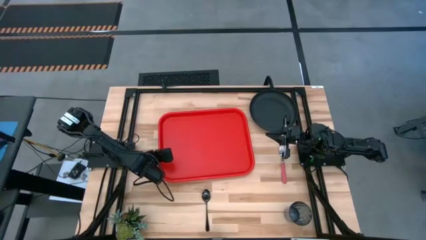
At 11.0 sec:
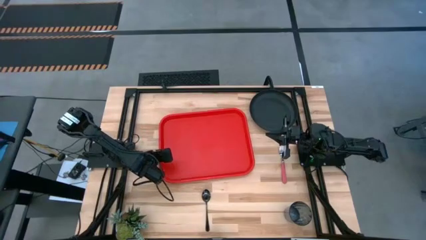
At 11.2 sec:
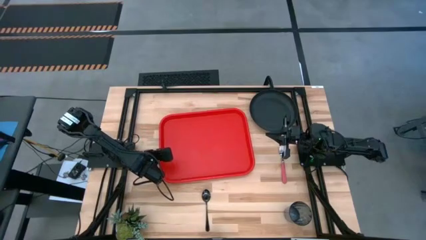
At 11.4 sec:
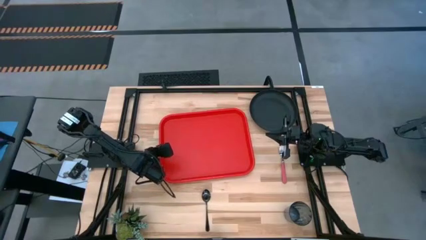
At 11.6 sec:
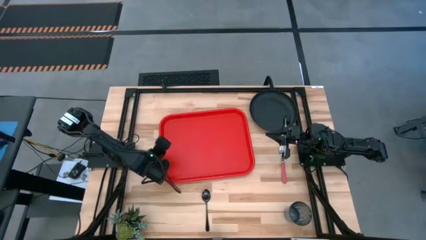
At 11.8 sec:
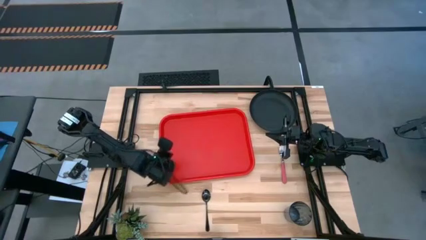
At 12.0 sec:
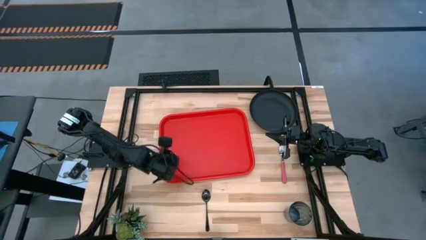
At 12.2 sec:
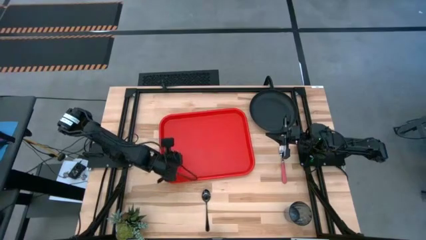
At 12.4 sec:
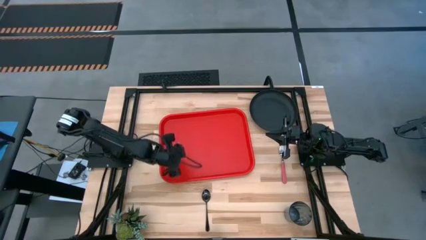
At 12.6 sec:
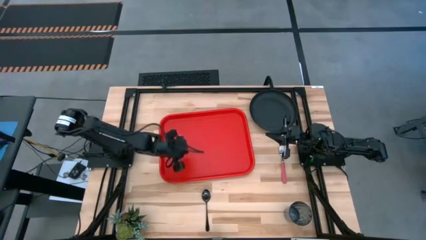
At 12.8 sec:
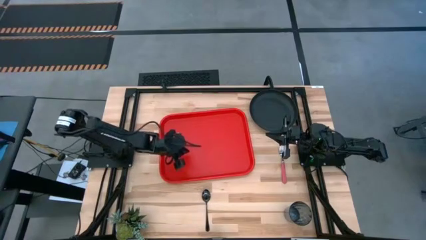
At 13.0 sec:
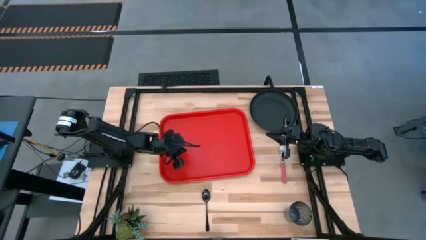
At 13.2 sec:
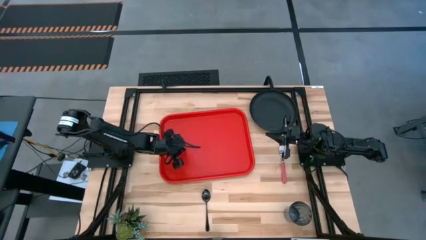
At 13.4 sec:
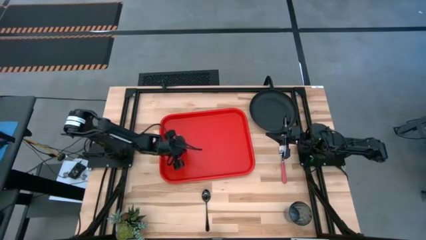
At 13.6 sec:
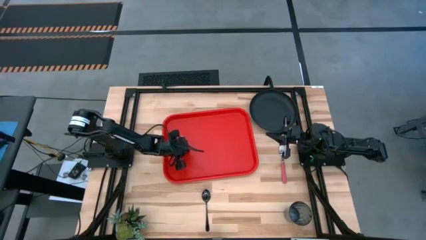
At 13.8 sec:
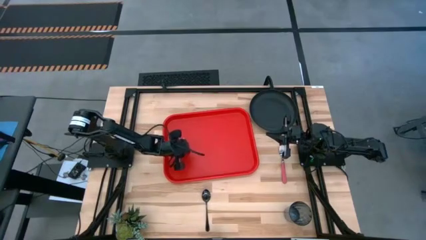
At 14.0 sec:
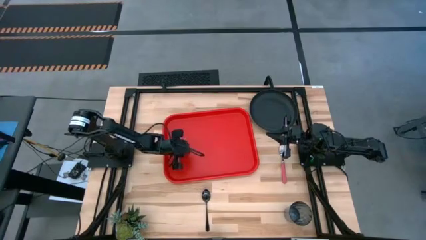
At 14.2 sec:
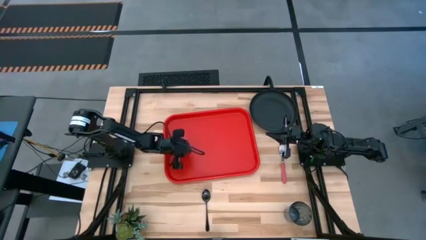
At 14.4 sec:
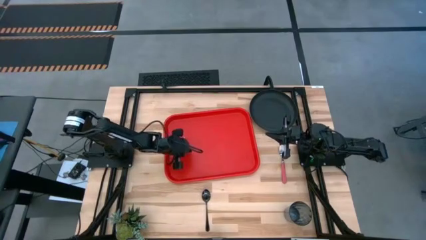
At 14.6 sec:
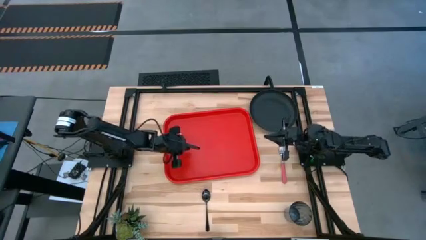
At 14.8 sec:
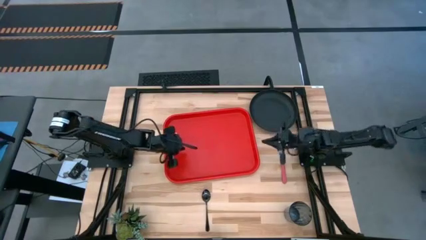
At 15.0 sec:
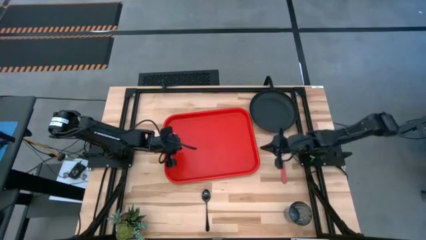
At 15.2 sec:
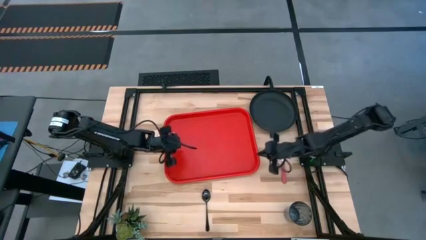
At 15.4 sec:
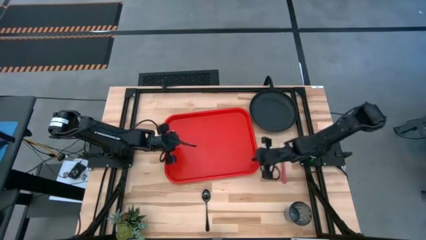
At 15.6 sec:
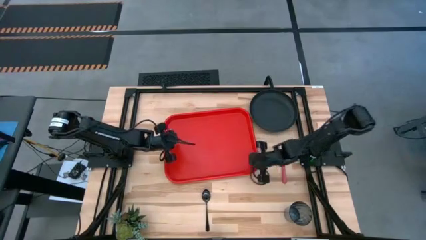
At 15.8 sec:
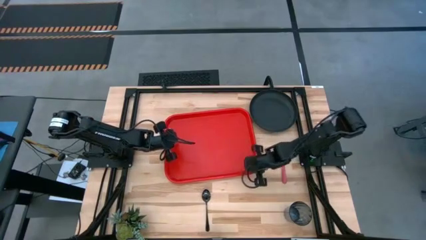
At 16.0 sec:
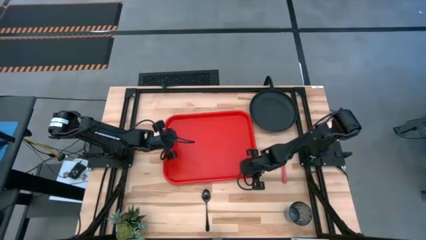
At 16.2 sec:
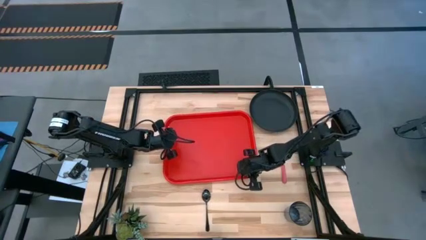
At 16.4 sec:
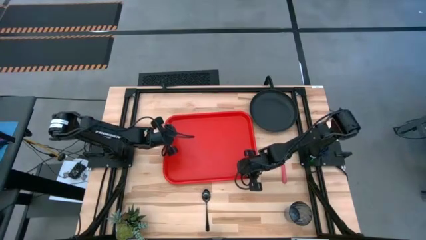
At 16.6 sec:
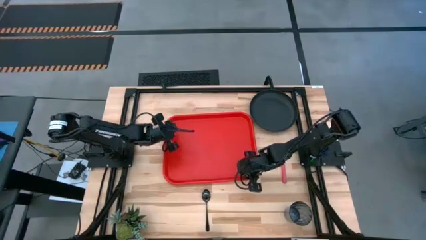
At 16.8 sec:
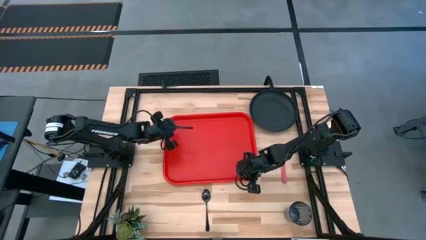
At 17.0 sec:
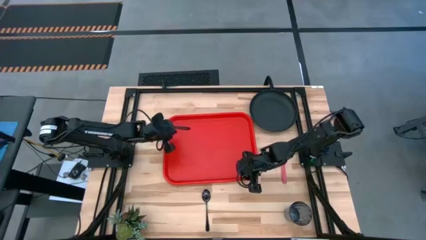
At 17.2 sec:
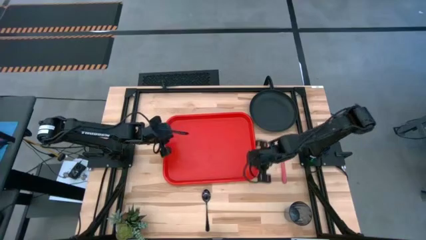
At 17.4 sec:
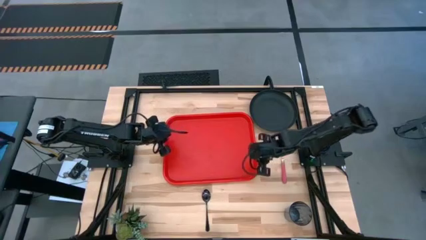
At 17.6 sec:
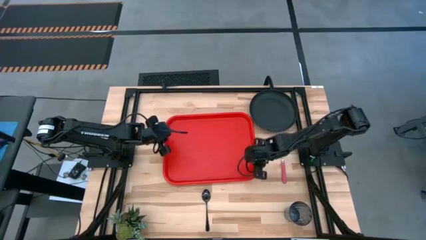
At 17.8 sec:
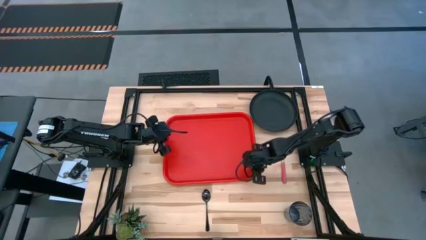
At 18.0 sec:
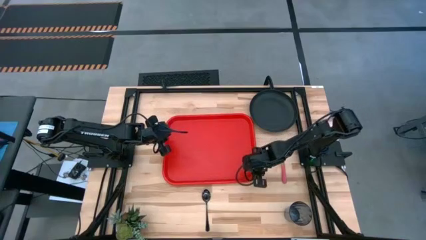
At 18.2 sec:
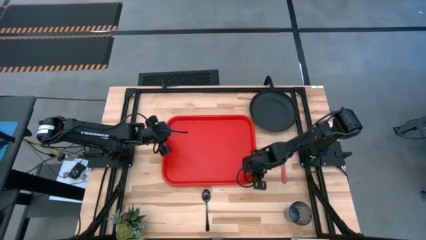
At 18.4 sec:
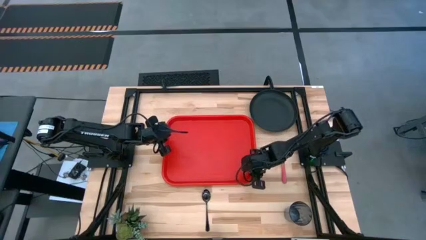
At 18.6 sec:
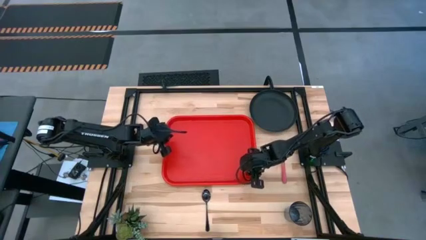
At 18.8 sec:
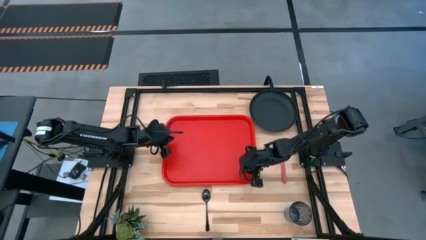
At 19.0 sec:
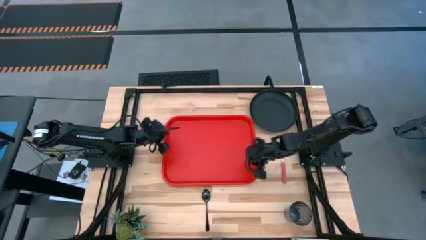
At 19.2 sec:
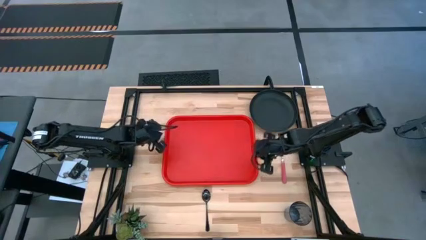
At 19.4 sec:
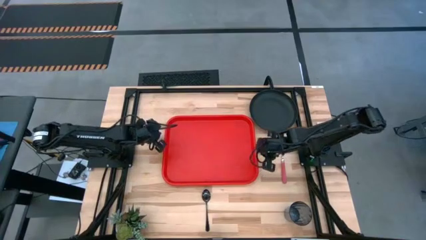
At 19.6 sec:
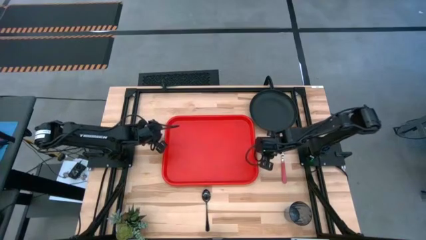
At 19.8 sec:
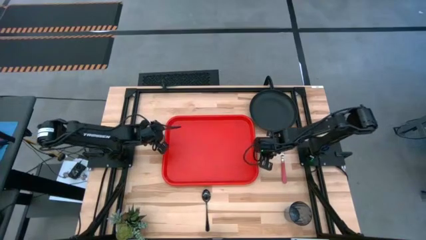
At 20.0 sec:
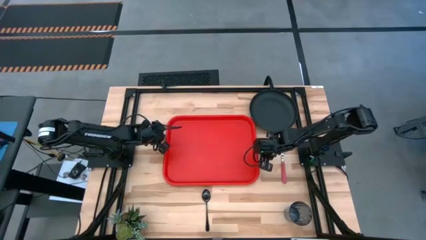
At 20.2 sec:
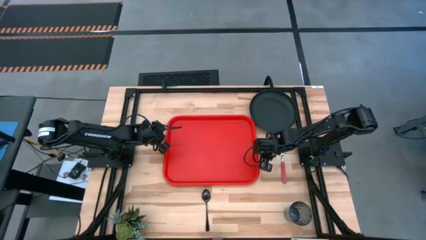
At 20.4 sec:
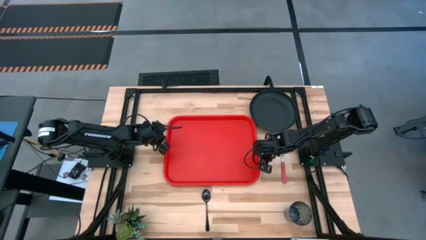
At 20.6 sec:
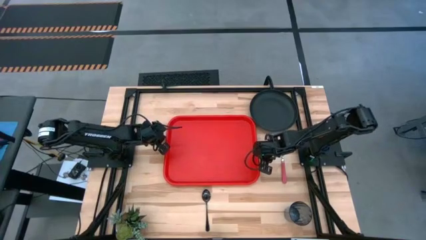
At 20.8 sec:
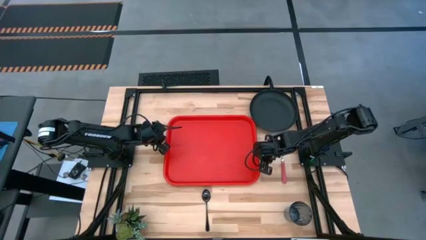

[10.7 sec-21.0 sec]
Task: Pick and place plate/cup/fork/spoon on tray
Prepare the red serving tray

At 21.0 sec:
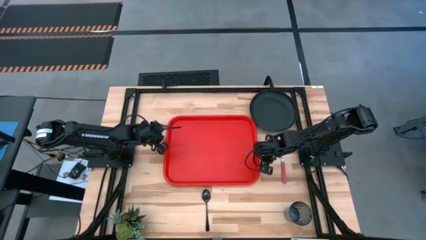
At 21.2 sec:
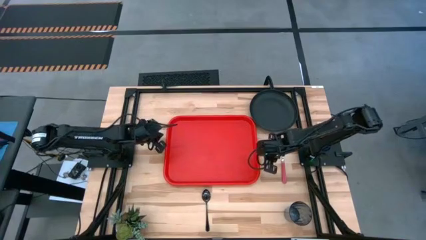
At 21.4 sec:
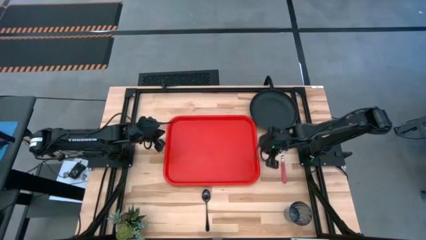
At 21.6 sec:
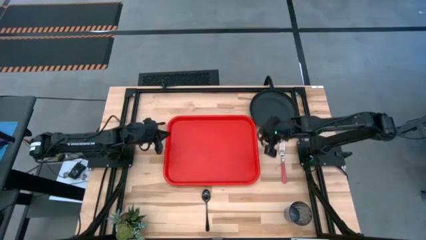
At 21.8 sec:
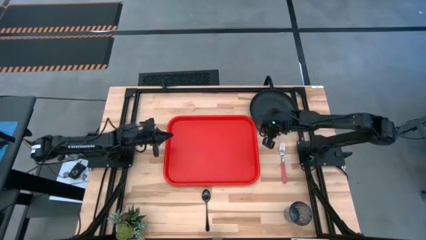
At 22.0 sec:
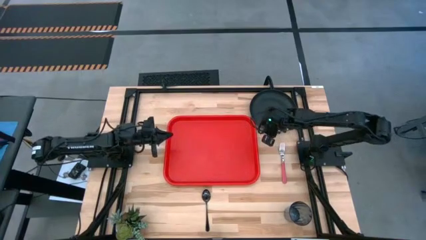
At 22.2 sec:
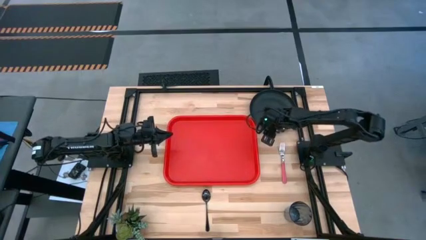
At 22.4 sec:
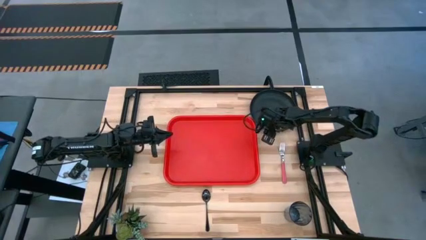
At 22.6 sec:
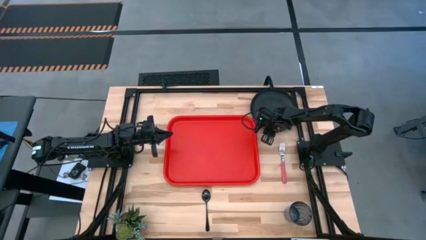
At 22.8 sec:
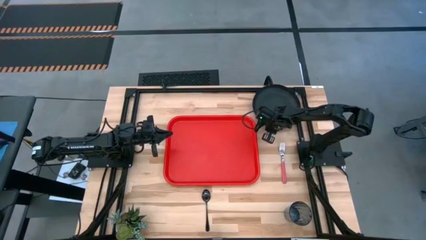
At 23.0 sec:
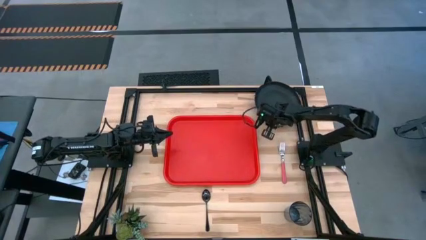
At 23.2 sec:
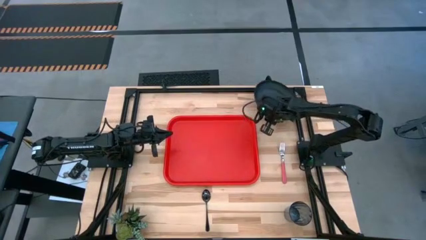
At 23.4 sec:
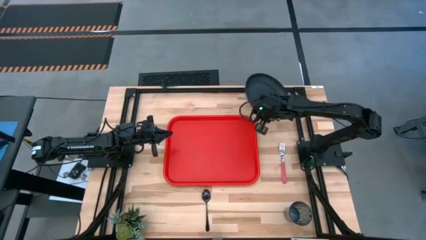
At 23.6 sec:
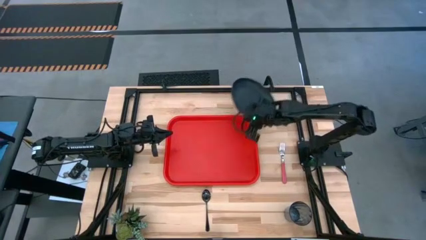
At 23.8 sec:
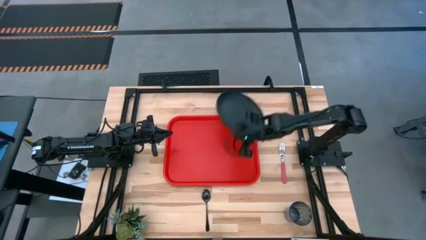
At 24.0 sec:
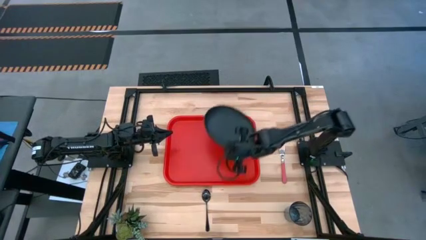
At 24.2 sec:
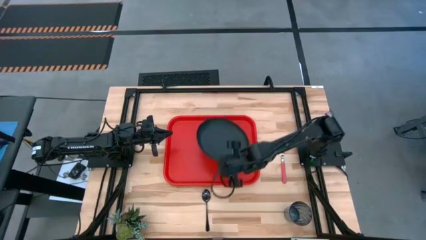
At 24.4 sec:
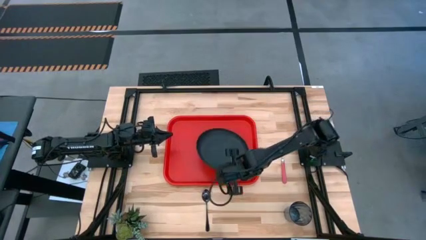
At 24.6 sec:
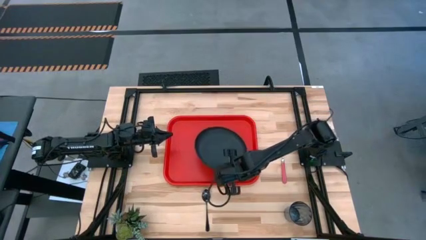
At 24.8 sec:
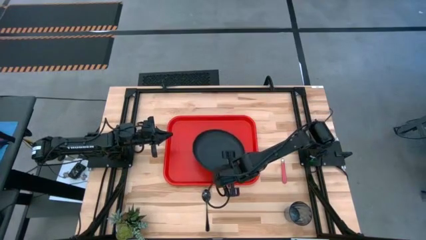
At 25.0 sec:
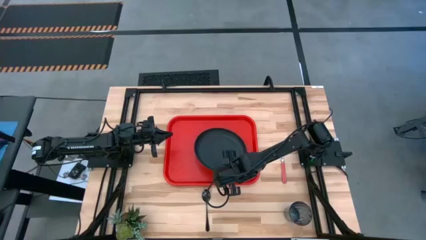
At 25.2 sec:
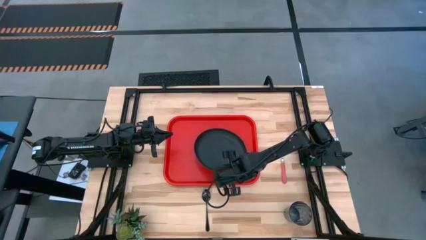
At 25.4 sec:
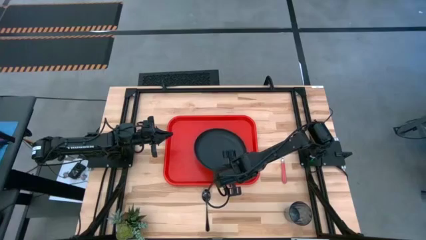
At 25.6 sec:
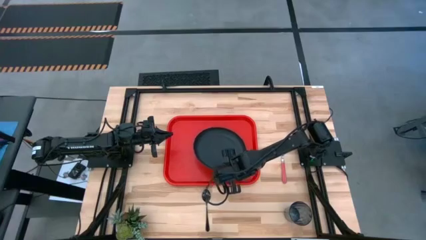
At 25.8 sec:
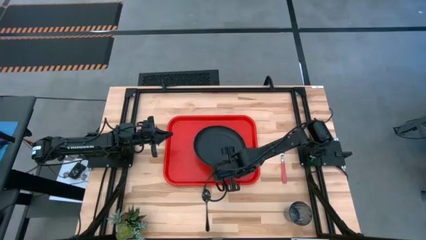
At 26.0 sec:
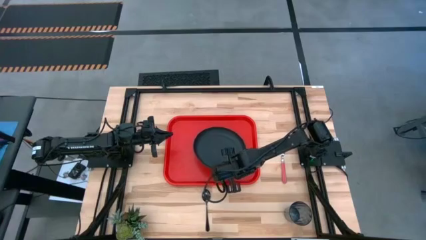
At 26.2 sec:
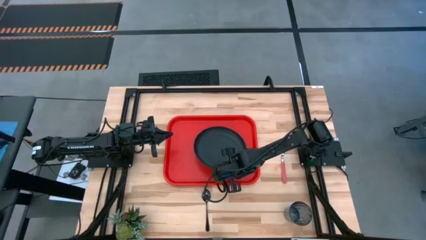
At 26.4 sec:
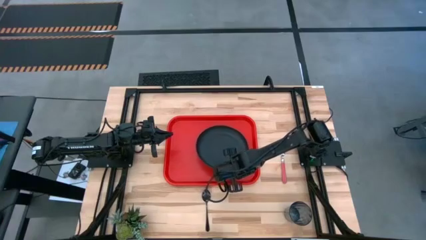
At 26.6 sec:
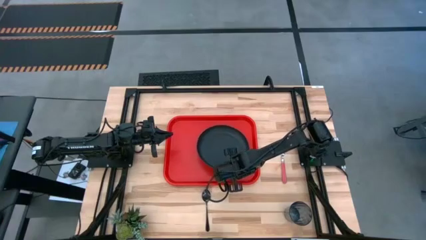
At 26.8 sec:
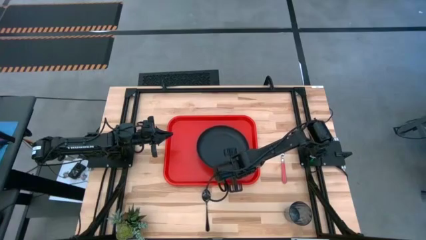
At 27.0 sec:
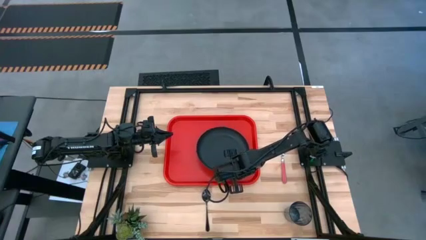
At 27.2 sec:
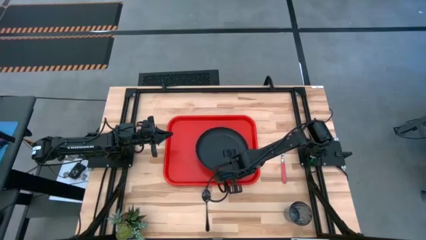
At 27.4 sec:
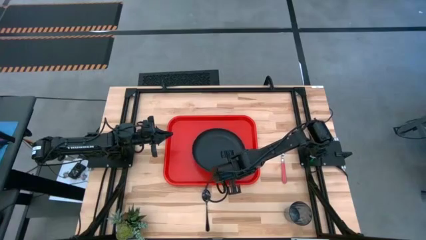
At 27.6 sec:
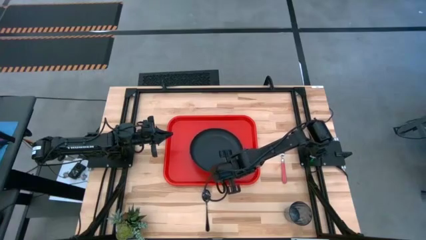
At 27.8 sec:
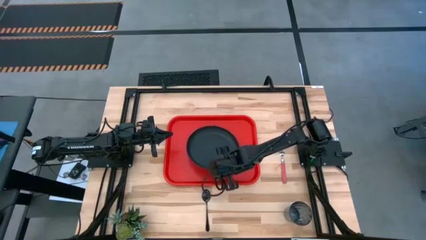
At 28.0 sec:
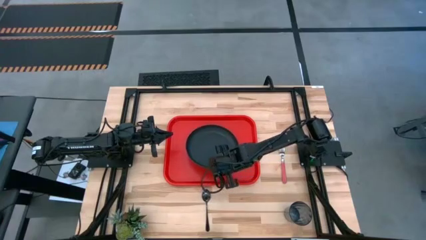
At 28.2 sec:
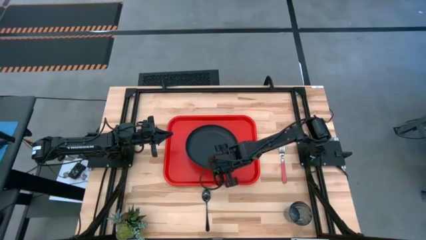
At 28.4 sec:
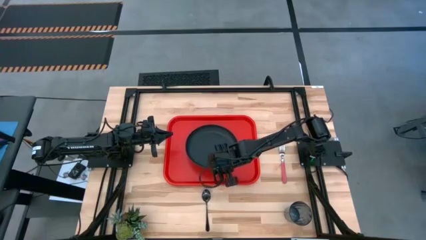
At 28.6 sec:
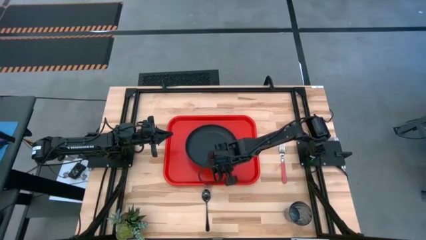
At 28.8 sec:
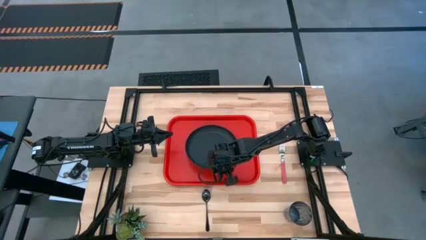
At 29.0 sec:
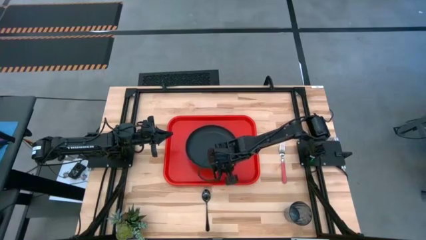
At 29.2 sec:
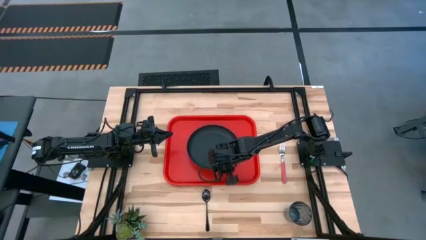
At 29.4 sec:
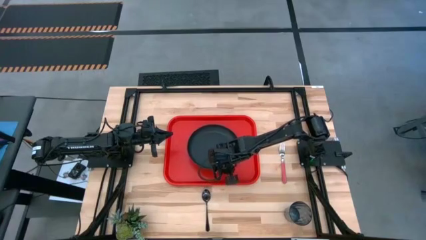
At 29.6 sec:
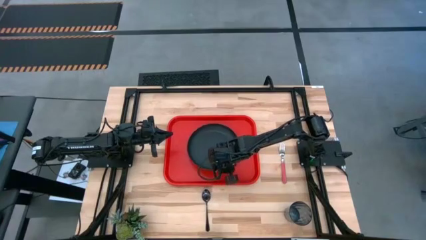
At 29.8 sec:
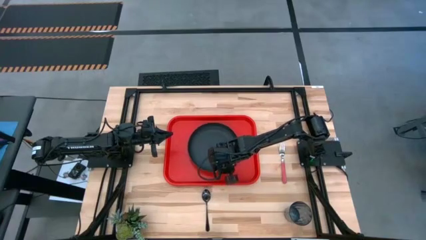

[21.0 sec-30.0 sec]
Put the black plate on the center of the red serving tray
